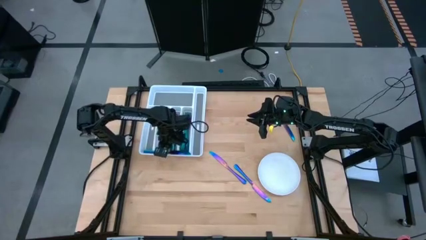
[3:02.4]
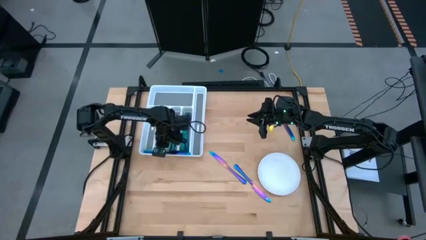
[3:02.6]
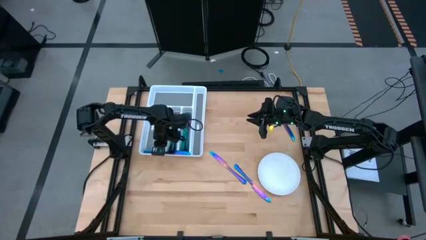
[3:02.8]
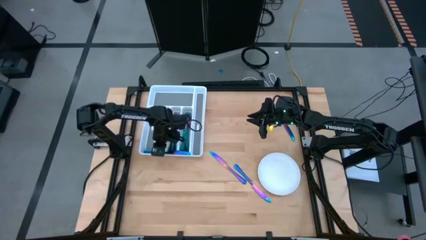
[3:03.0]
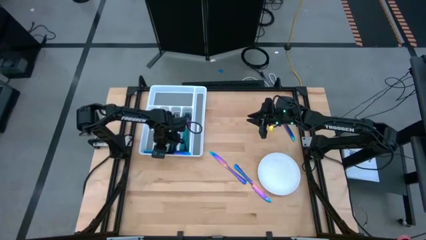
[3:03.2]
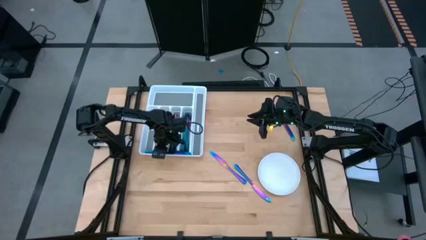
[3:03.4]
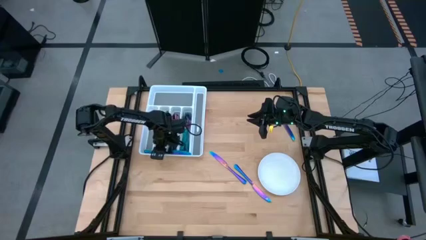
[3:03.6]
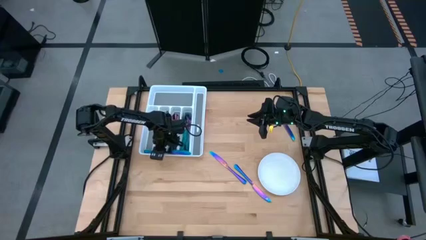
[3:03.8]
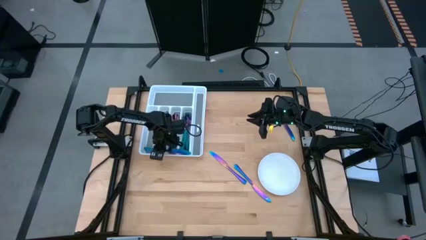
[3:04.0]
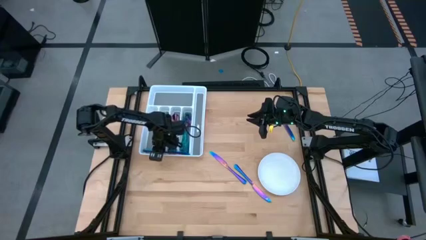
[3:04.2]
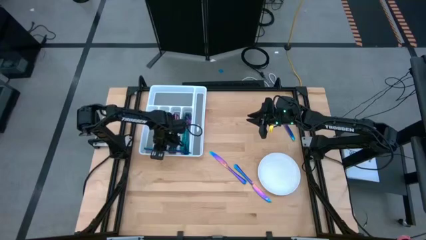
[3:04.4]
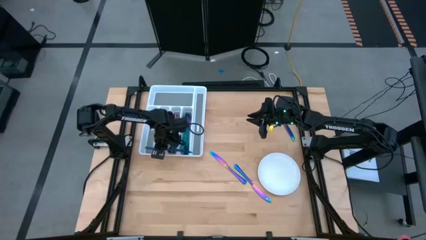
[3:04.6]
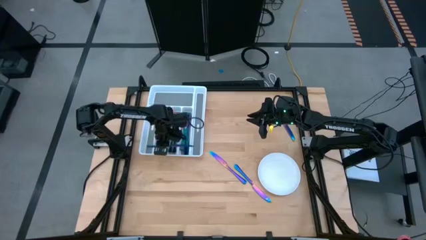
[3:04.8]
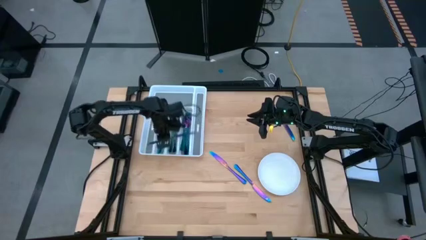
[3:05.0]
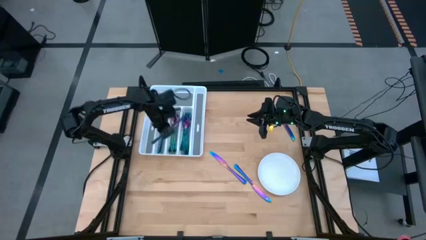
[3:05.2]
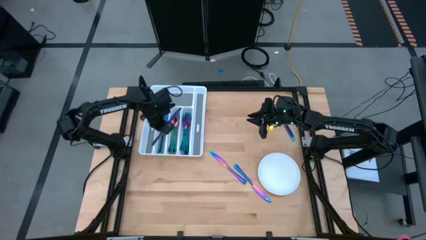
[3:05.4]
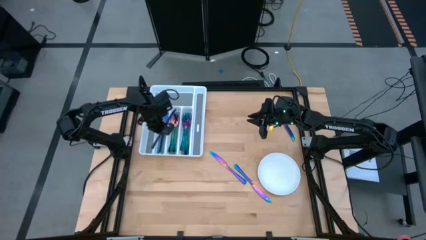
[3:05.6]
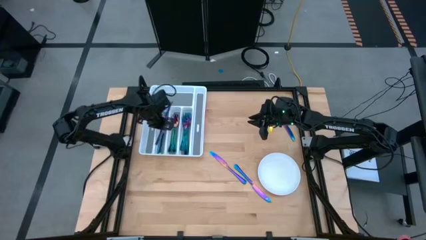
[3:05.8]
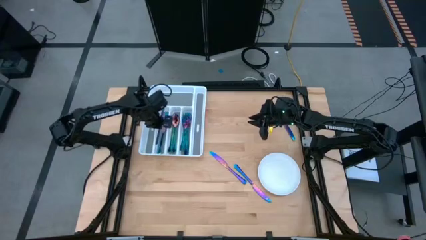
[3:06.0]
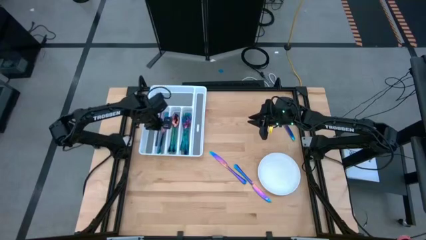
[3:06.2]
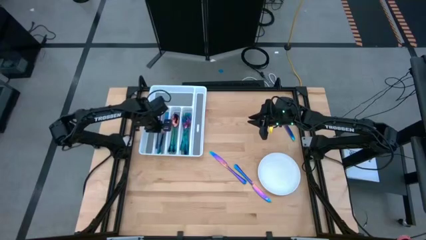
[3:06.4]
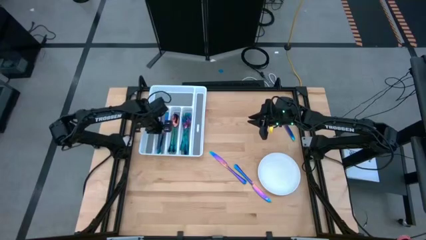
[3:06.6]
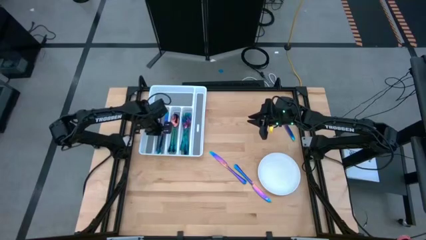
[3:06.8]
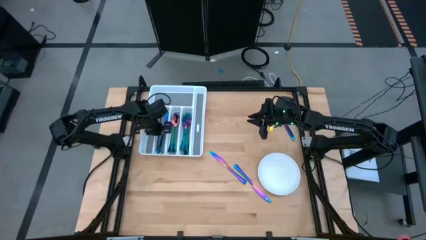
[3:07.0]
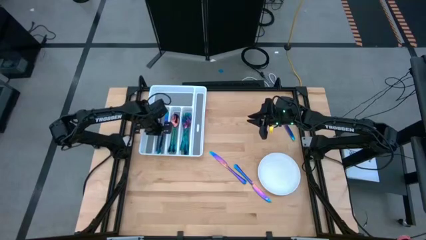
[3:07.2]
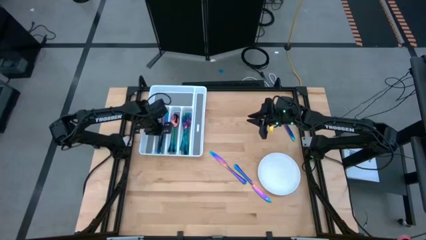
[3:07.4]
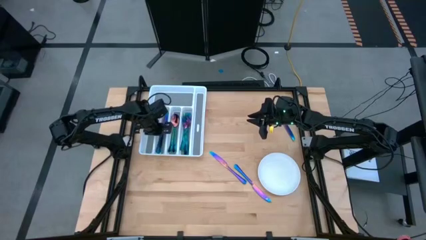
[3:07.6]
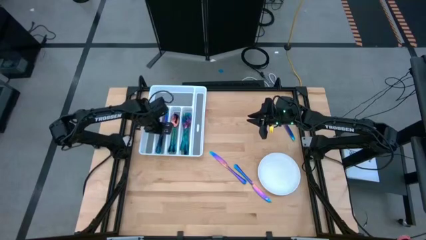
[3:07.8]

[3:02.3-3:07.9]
Task: Sort silverware
Put the iridescent knife into the white silverware tray

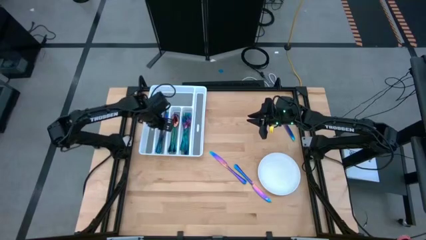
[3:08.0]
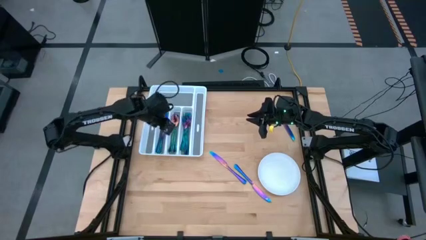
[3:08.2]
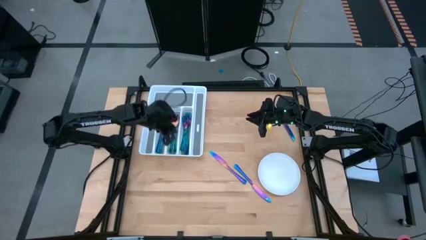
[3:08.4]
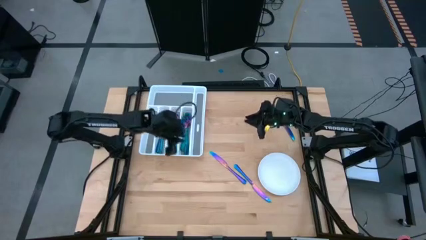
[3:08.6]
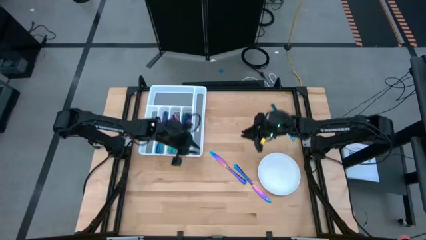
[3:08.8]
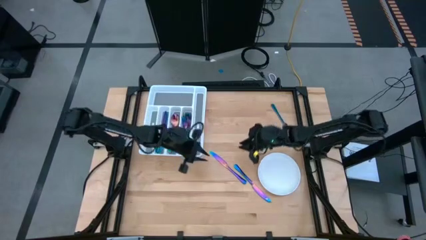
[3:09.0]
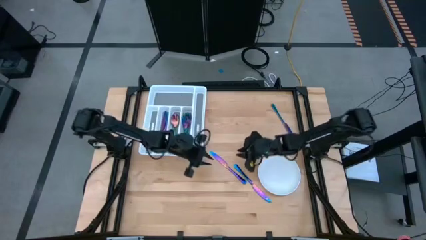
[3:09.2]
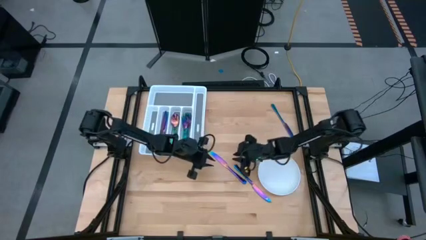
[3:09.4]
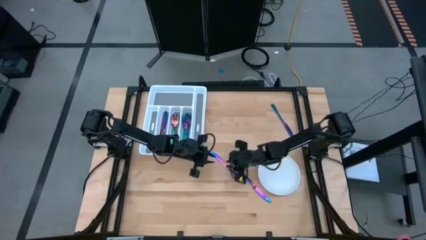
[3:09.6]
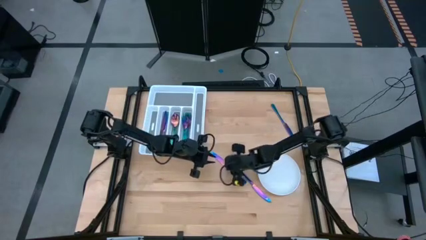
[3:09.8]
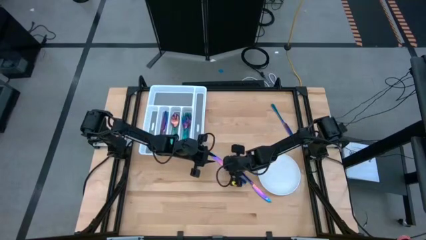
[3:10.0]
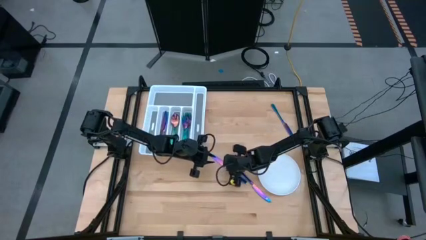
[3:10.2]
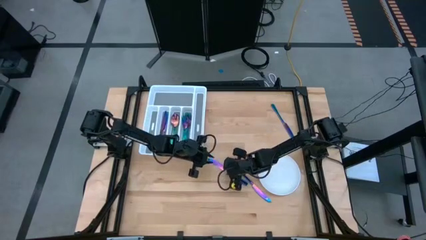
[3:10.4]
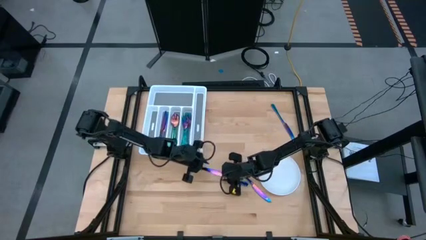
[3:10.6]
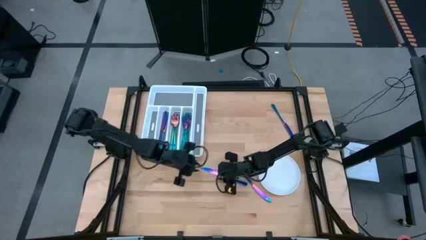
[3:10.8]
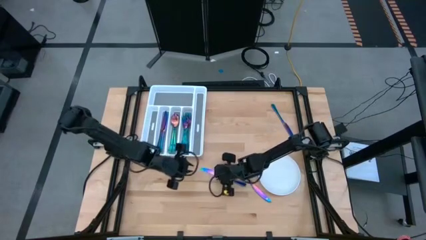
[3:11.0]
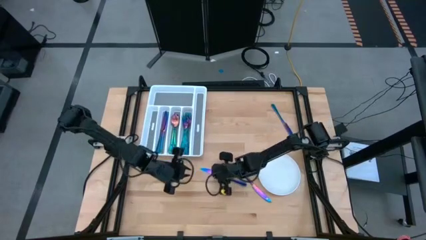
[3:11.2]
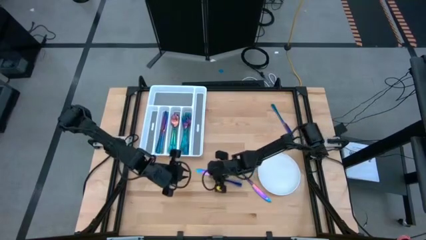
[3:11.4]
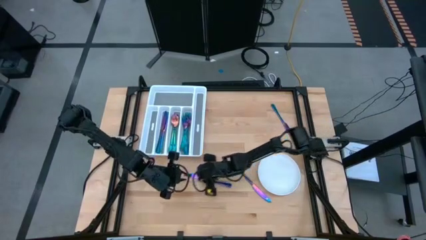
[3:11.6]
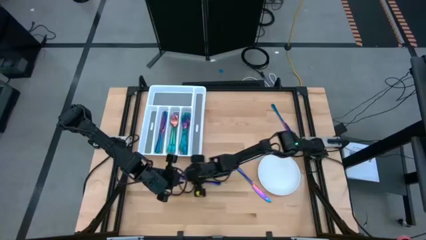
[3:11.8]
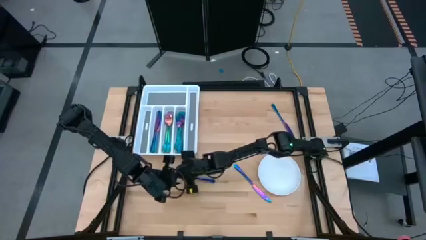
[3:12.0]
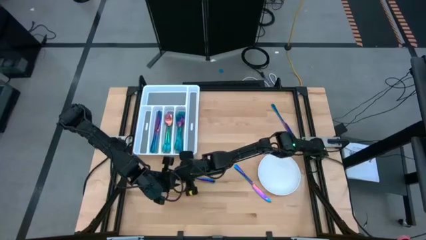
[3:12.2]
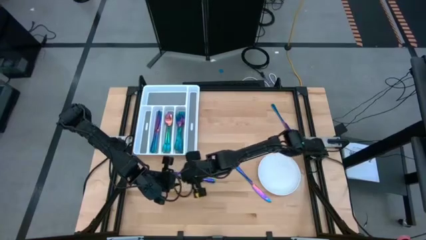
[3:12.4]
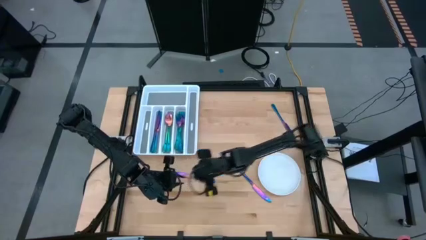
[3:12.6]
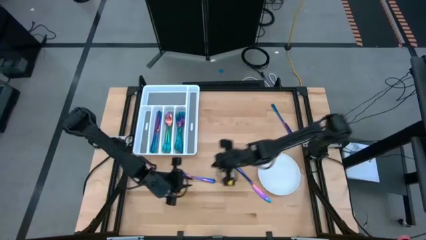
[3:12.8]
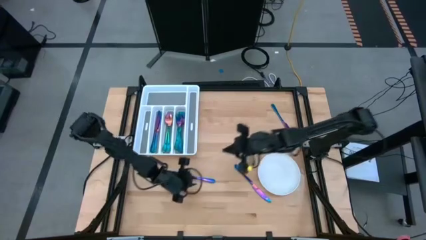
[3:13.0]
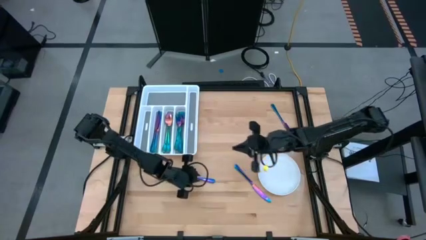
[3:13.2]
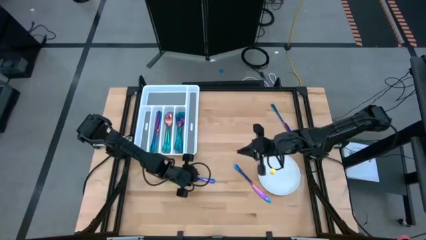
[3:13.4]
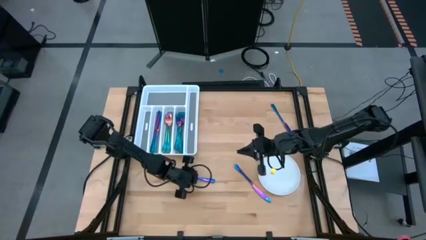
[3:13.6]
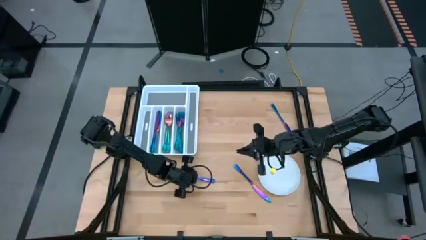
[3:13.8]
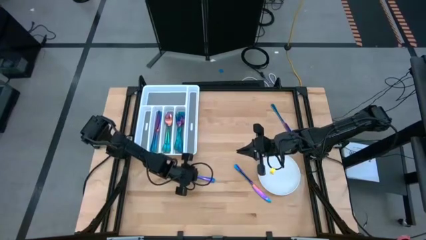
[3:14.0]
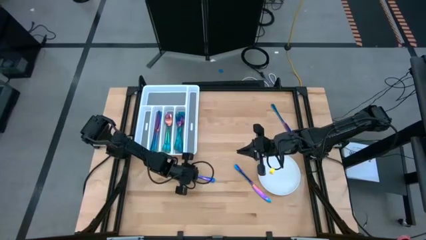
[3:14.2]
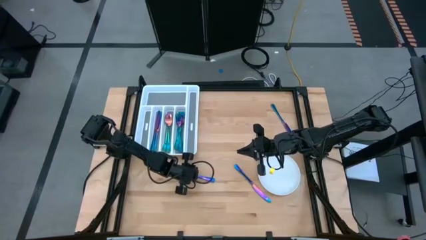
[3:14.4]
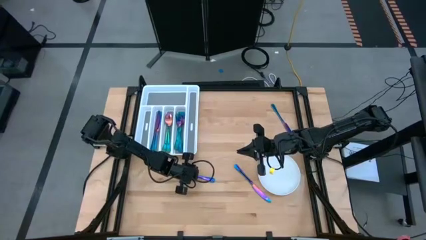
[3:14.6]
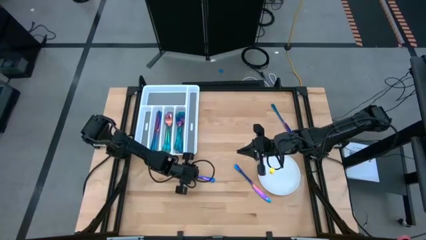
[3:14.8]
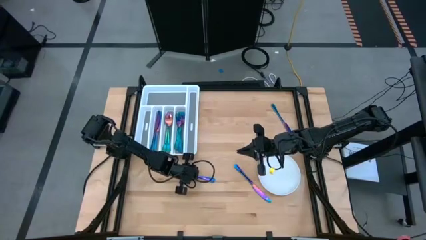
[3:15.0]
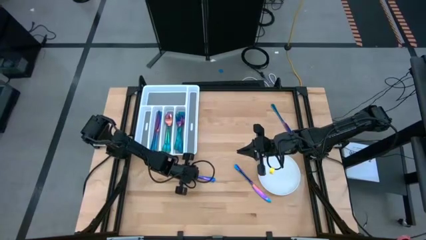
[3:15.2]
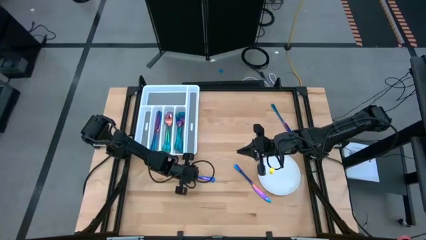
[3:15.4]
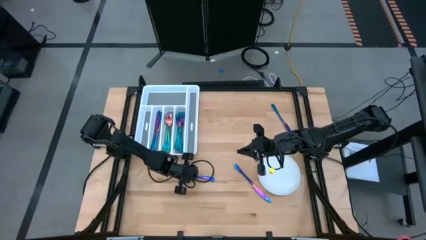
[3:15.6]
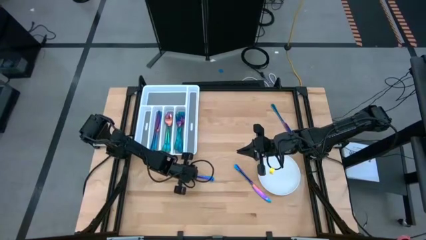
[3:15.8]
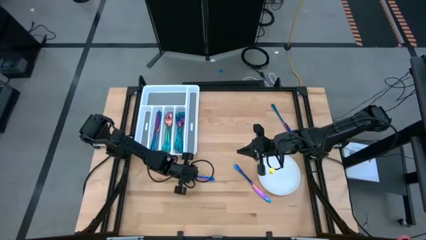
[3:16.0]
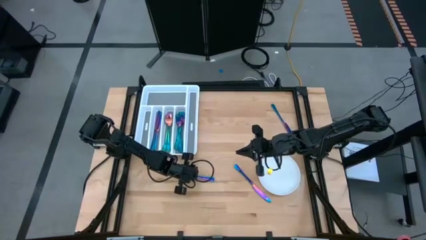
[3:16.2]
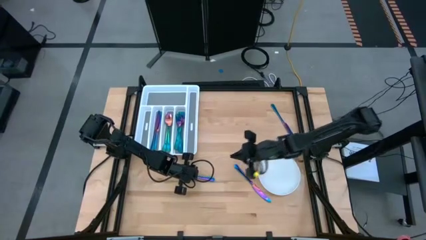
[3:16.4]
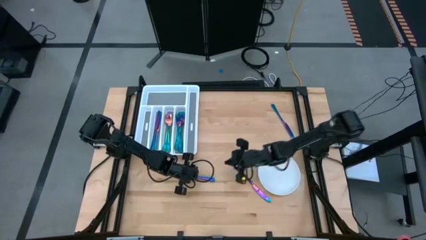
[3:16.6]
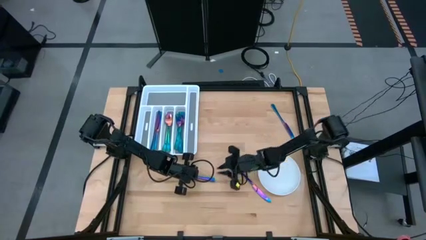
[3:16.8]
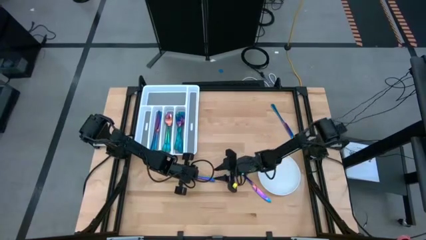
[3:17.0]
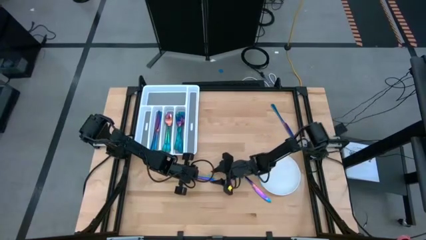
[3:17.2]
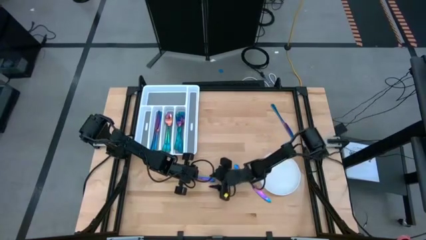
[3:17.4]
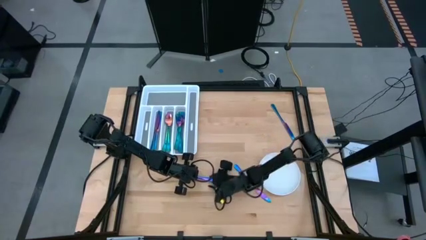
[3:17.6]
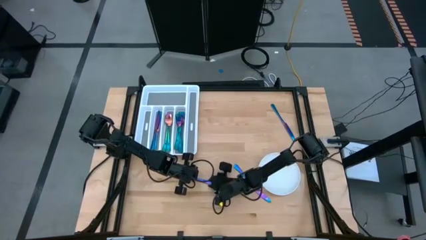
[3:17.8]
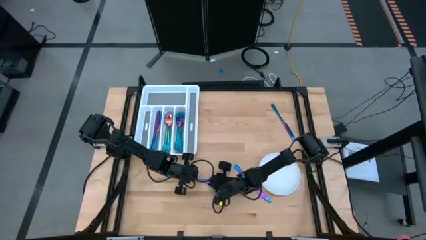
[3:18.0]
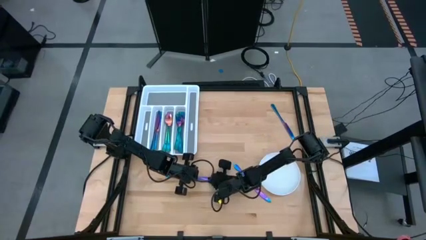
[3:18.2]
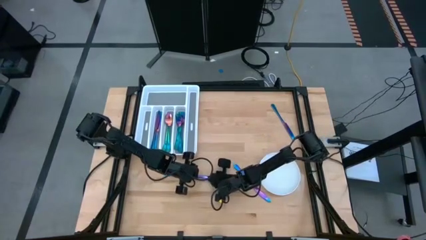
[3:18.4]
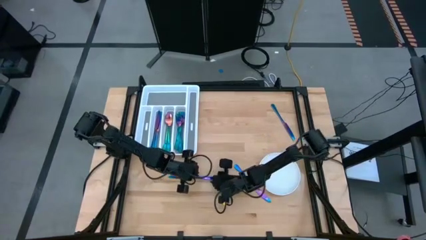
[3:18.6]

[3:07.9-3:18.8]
Put the knife into the white tray
